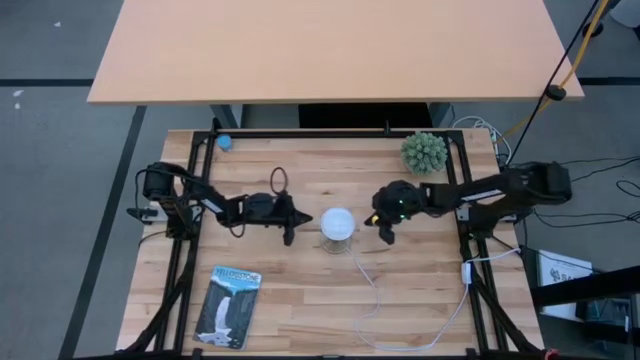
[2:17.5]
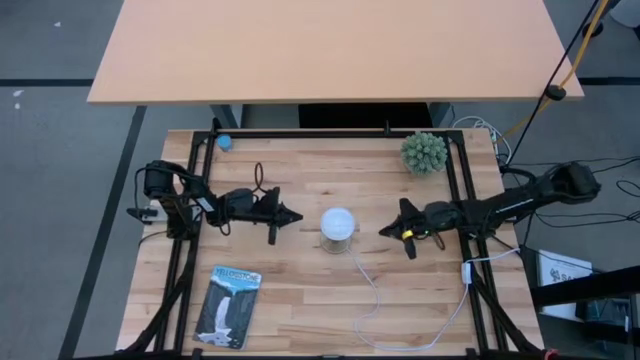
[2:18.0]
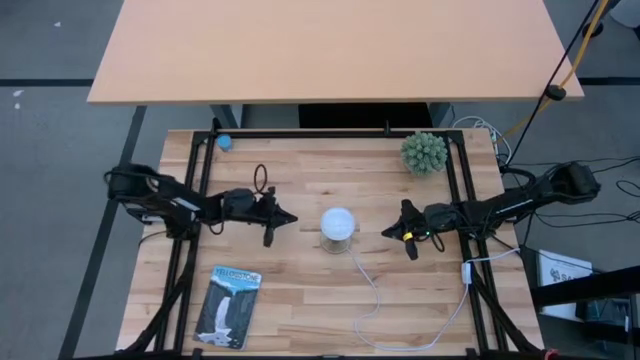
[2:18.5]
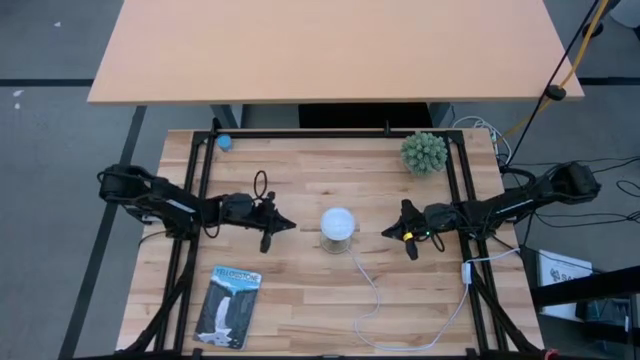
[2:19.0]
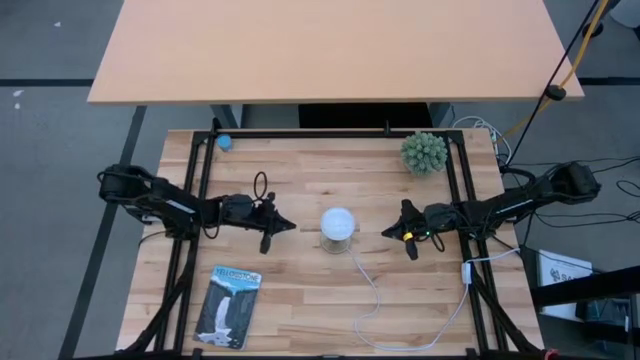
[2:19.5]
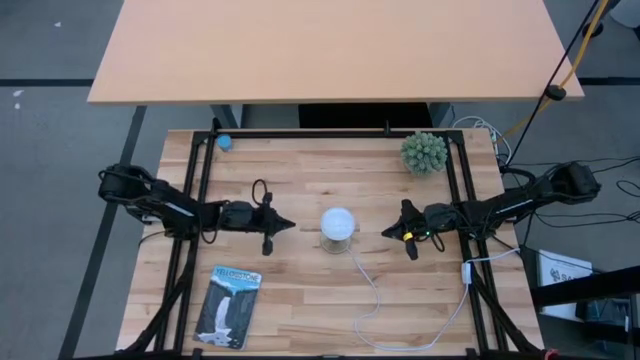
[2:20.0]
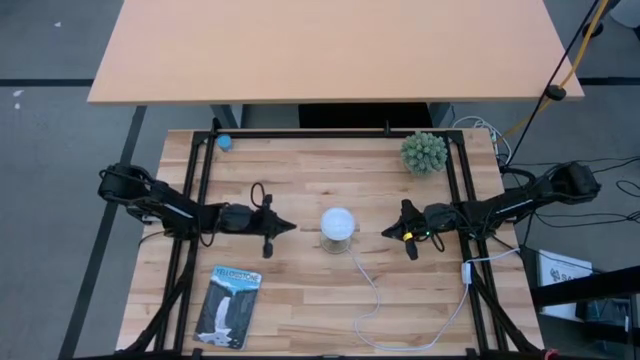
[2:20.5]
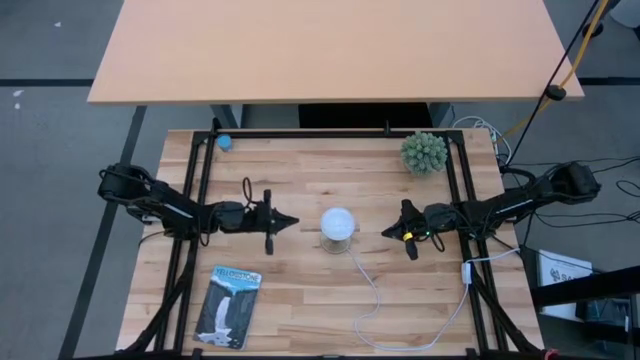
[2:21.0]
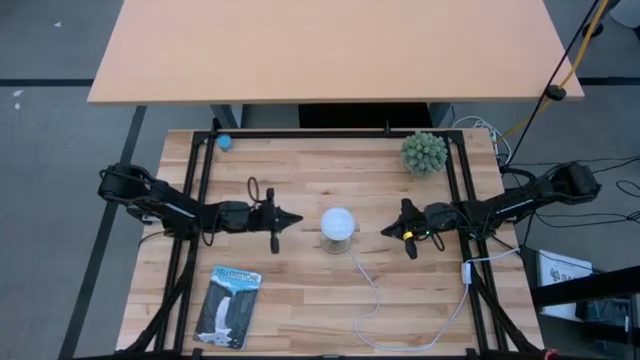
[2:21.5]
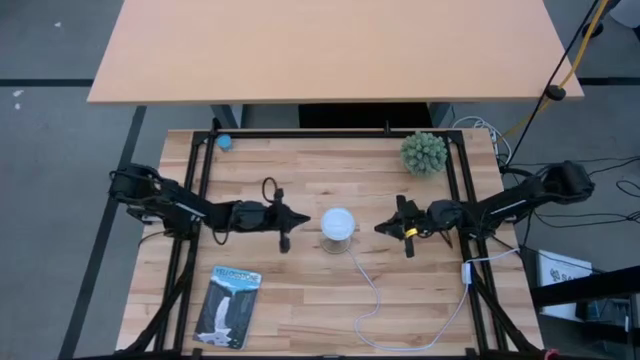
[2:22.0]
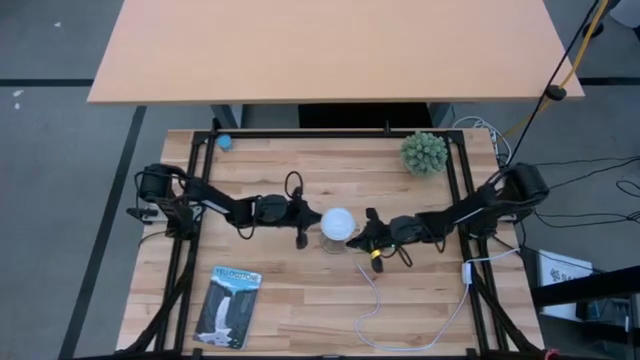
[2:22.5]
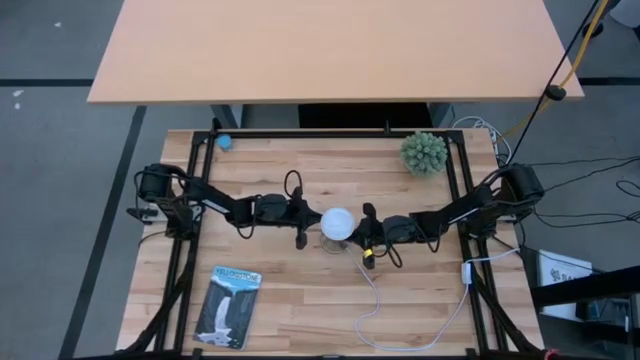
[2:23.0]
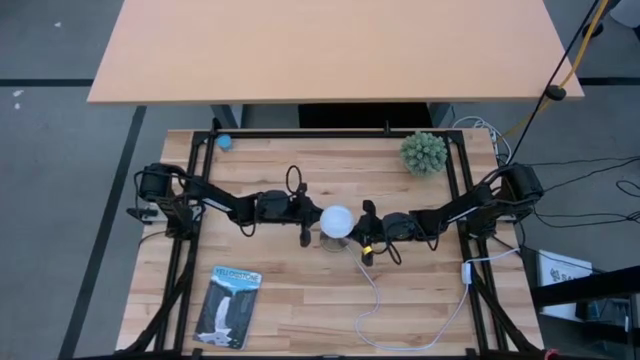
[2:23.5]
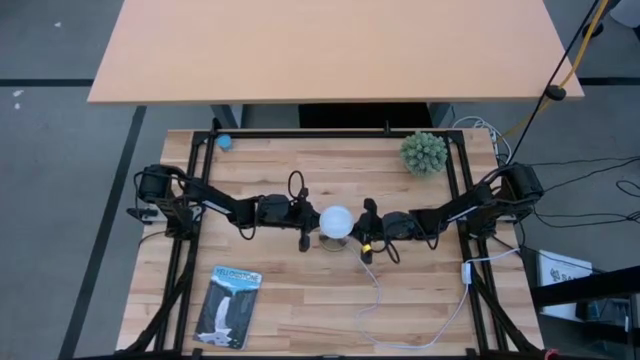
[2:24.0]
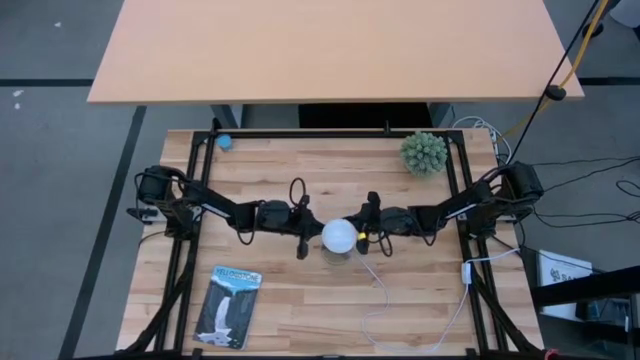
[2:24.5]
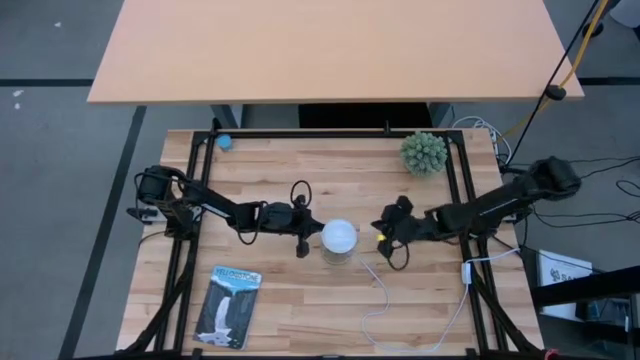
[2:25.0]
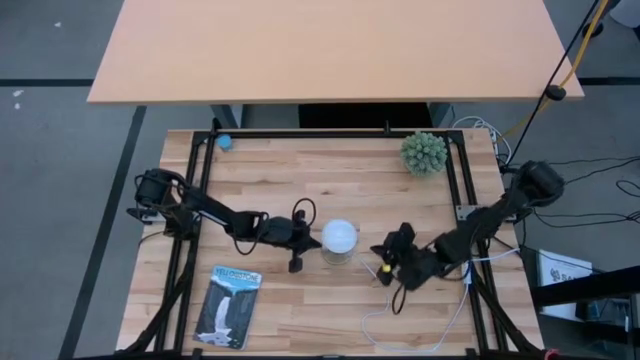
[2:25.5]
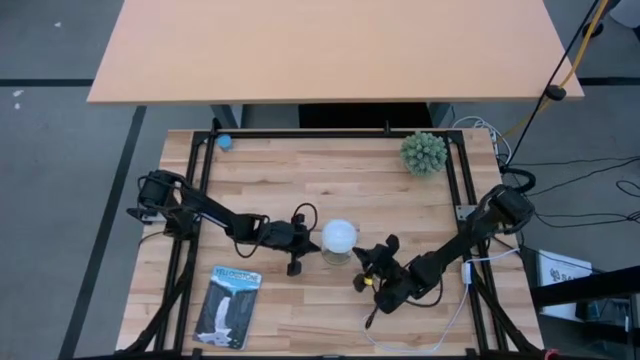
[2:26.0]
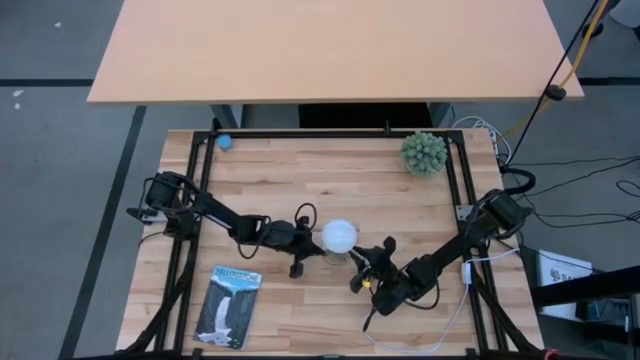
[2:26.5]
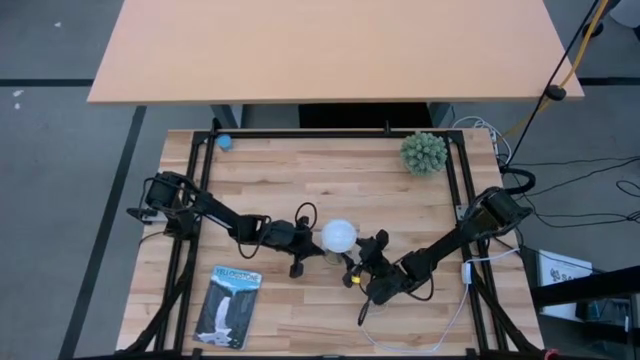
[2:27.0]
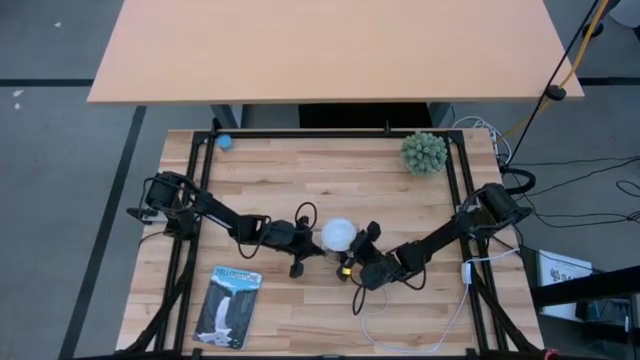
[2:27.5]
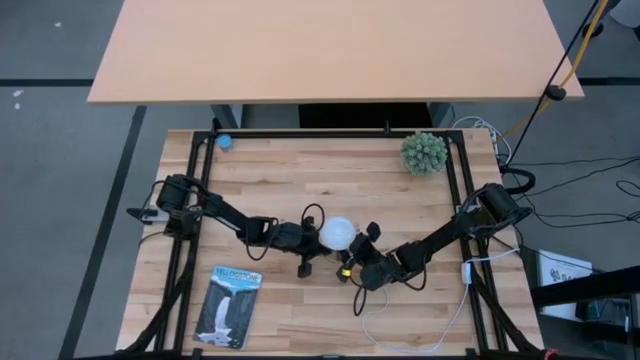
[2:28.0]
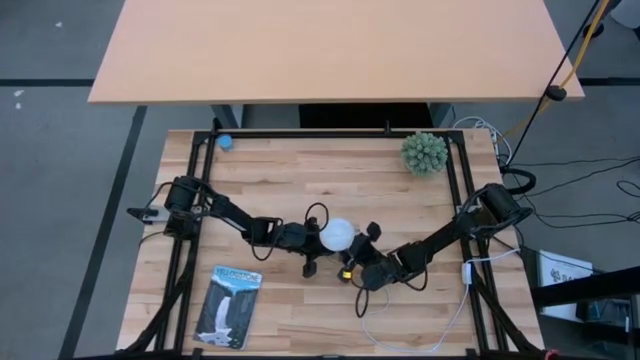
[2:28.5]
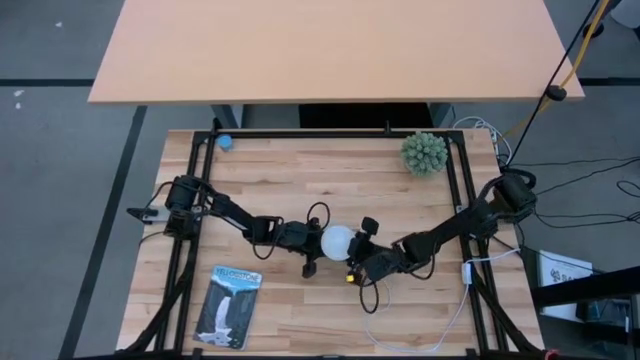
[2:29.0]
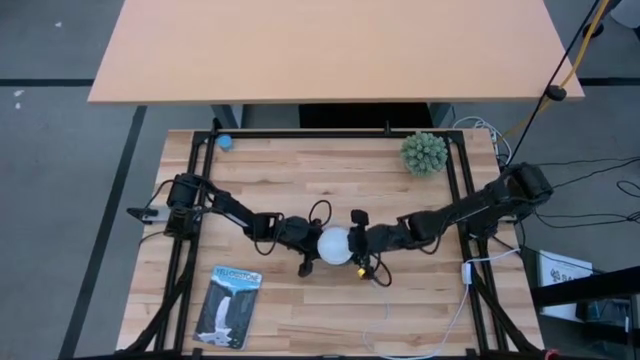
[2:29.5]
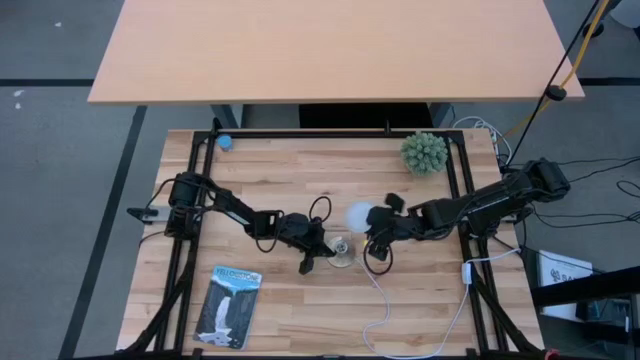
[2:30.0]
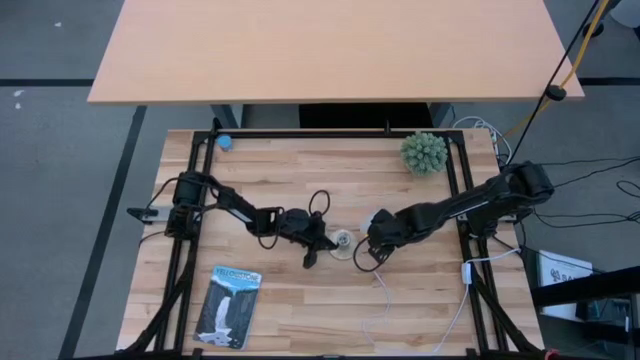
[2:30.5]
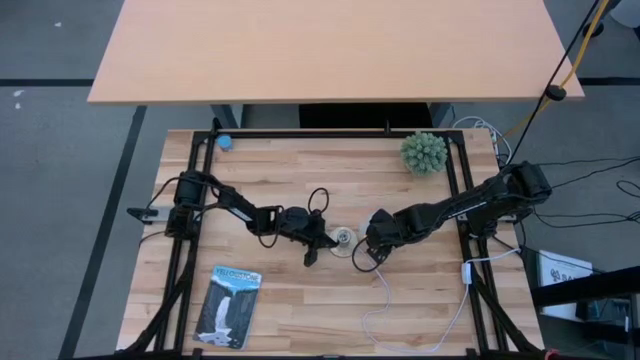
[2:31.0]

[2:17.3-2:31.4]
Task: Screw lightbulb
Remove the lightbulb from the lamp

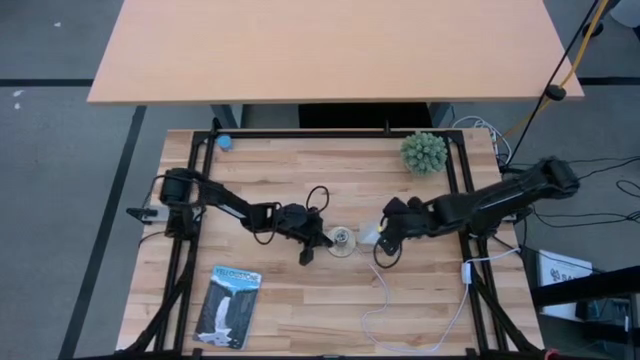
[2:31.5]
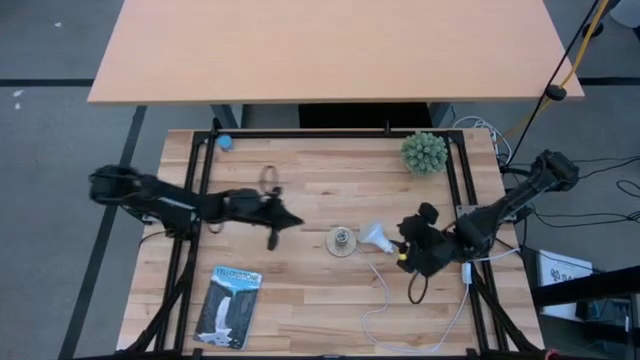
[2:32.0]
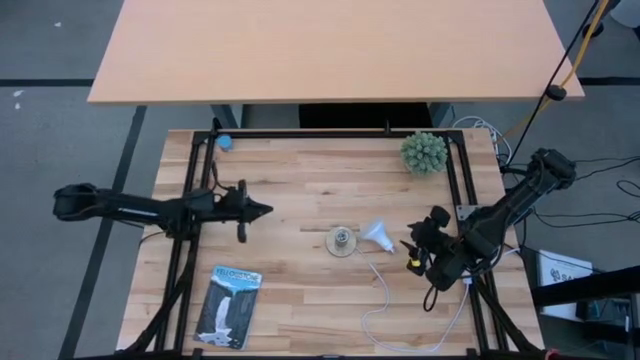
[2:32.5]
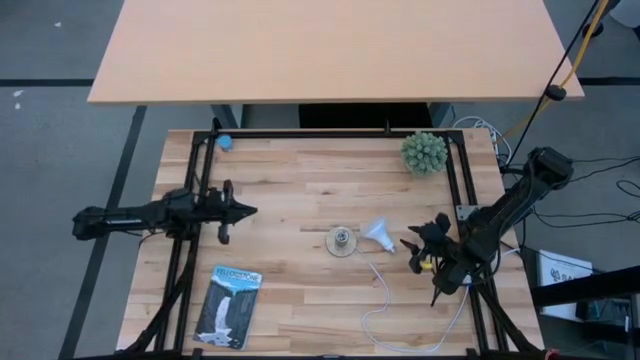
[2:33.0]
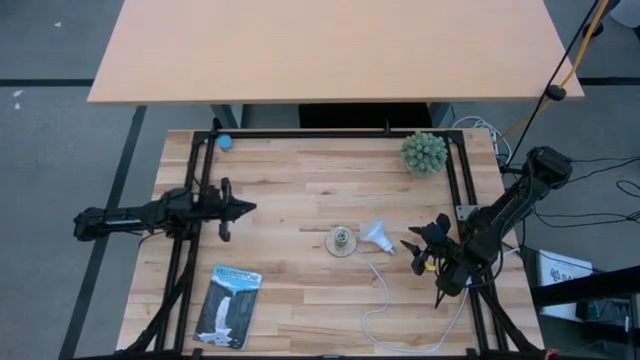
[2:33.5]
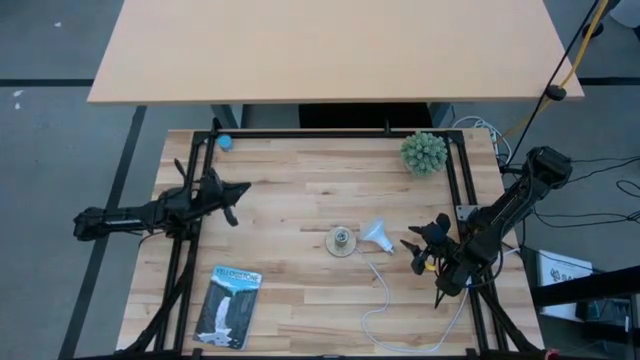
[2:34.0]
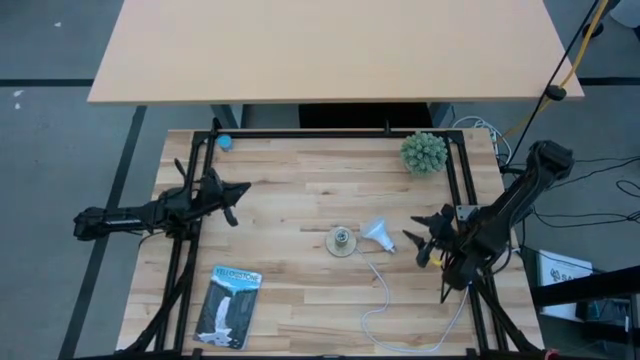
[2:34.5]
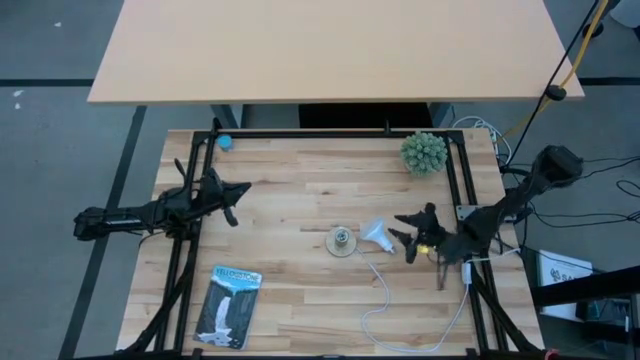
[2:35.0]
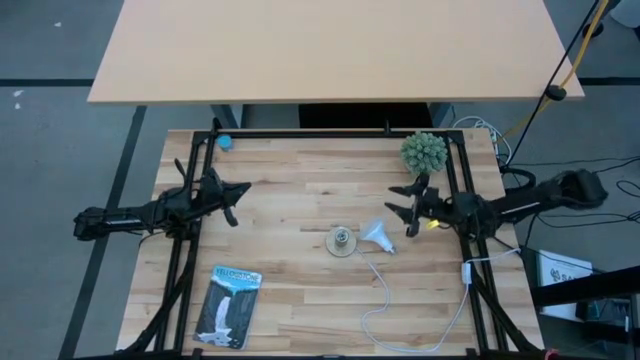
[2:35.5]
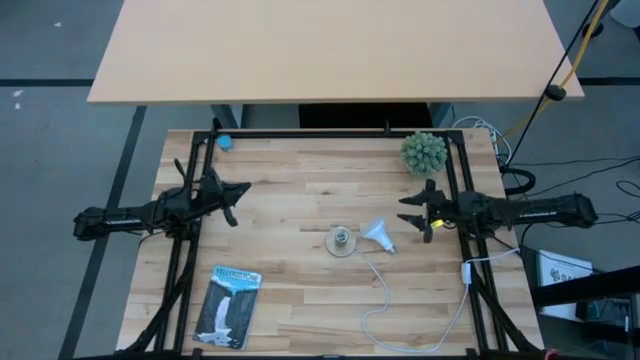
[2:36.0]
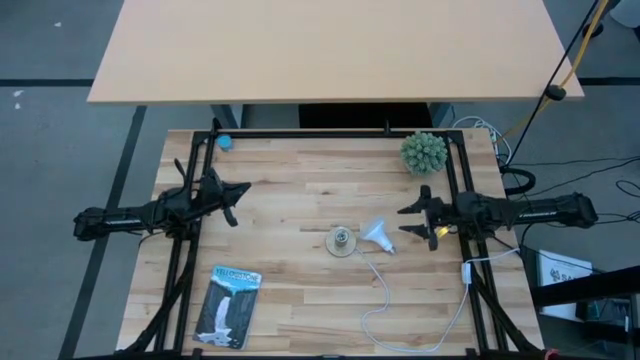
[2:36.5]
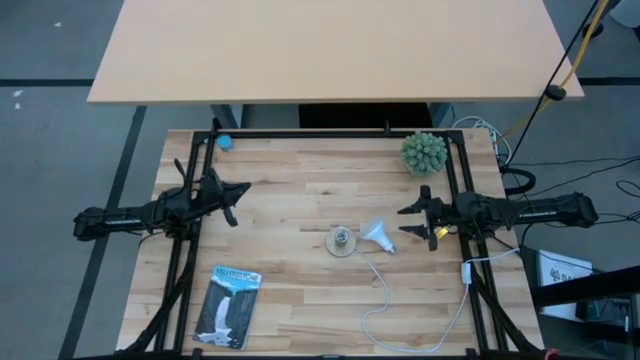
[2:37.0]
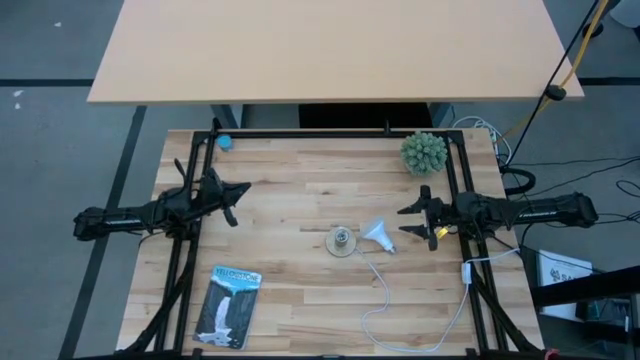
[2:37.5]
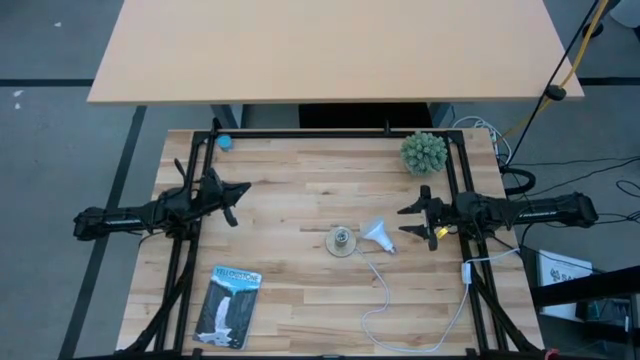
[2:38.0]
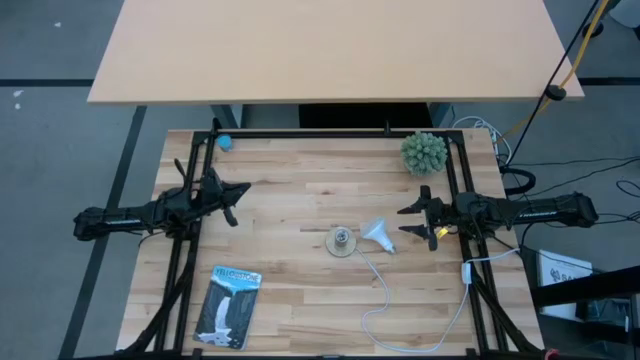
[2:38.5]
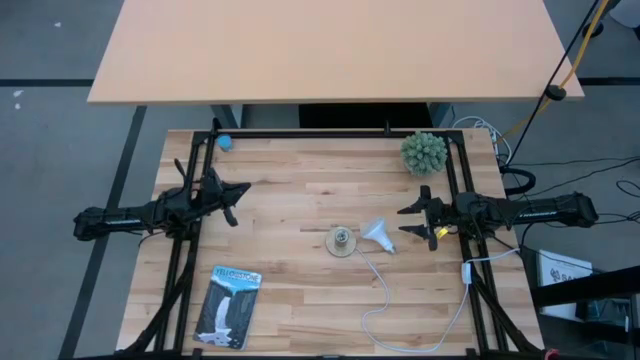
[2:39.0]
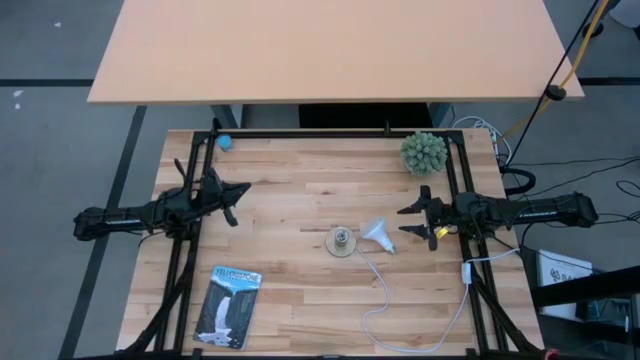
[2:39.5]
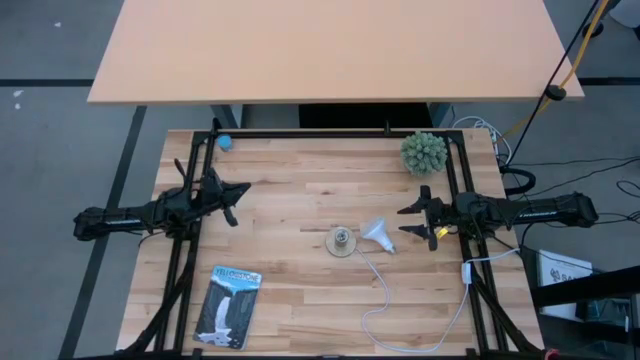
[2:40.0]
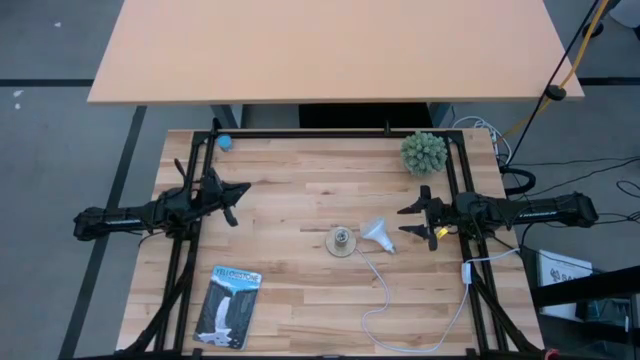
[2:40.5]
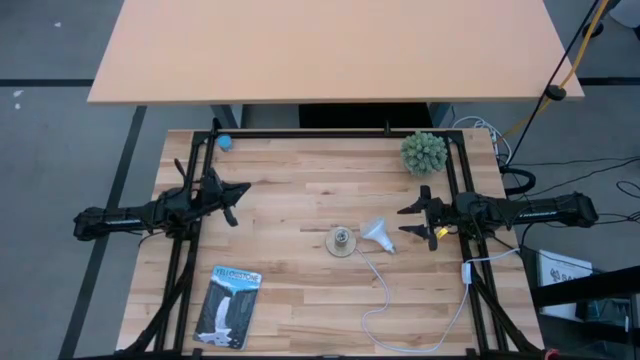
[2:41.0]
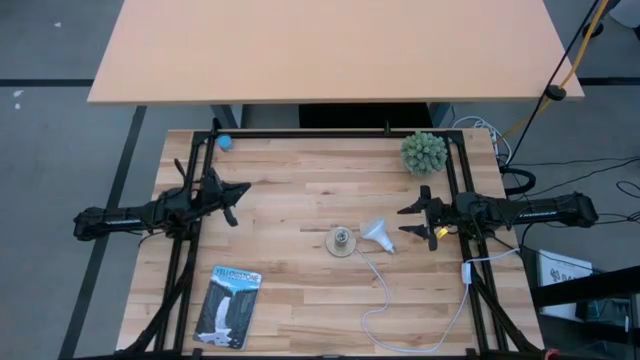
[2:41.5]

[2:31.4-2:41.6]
Return to Home Position
